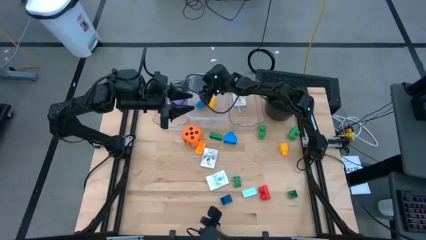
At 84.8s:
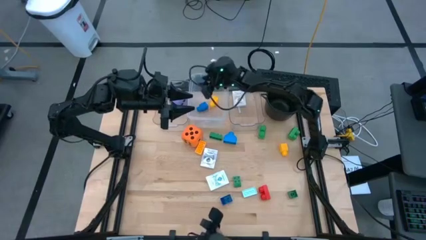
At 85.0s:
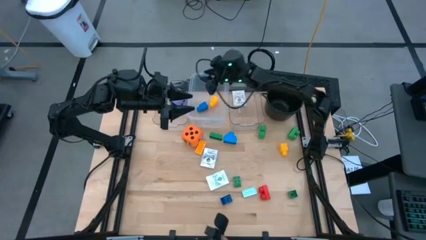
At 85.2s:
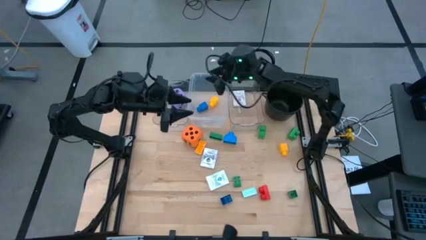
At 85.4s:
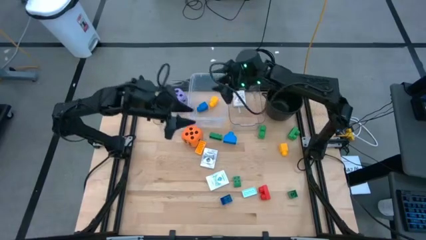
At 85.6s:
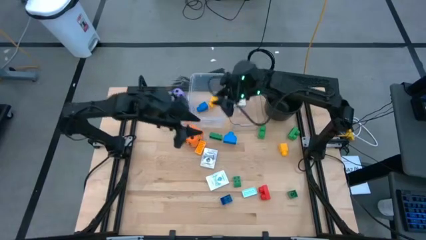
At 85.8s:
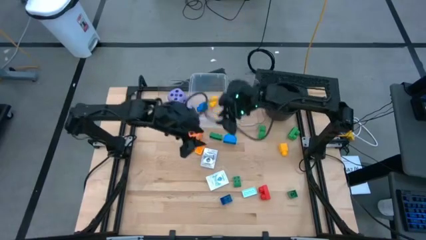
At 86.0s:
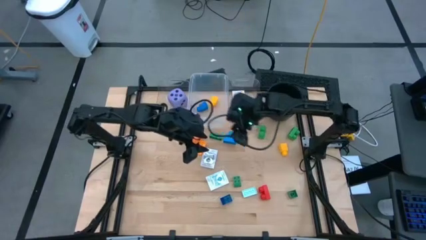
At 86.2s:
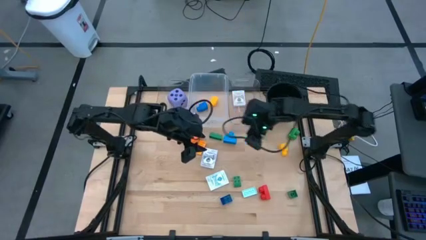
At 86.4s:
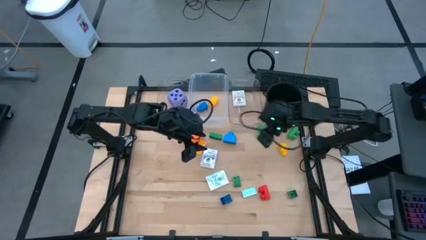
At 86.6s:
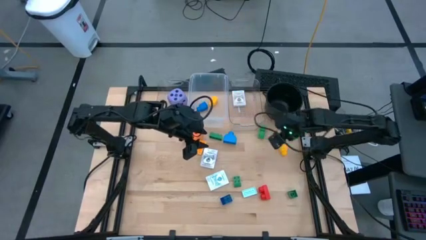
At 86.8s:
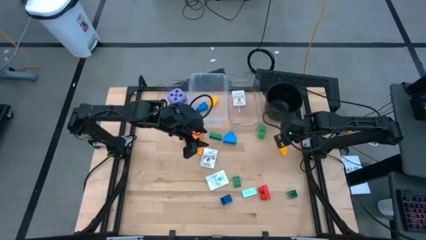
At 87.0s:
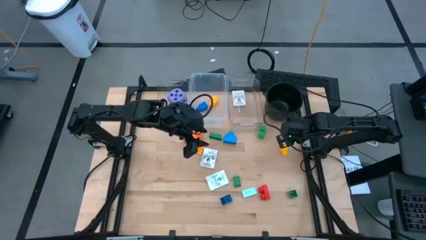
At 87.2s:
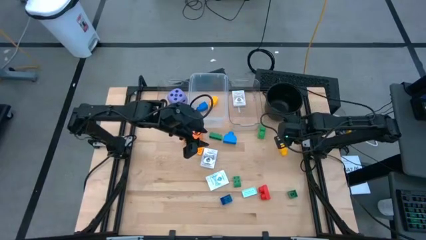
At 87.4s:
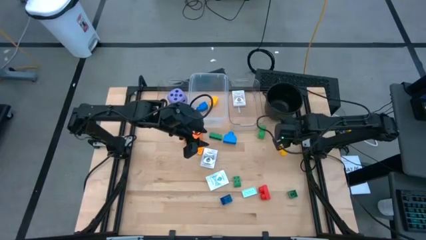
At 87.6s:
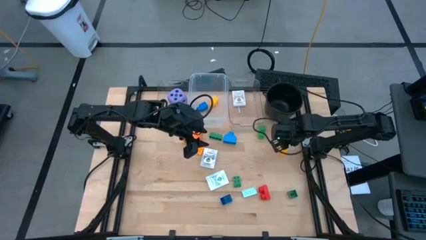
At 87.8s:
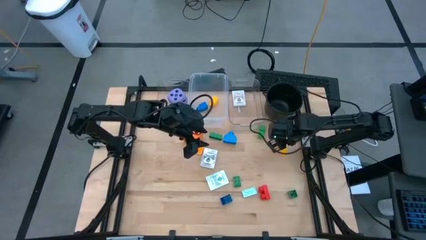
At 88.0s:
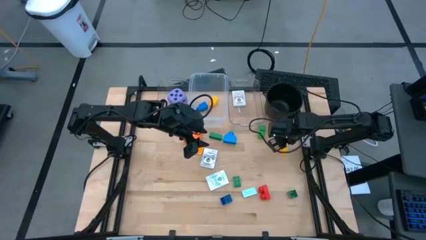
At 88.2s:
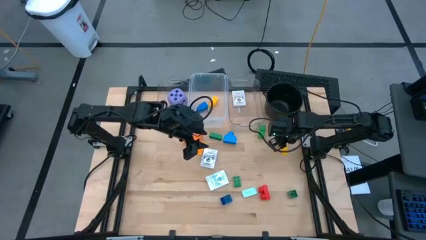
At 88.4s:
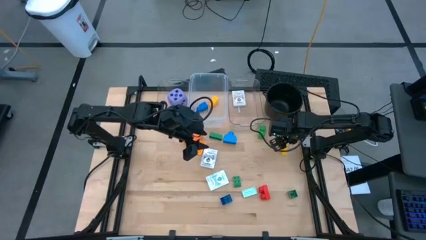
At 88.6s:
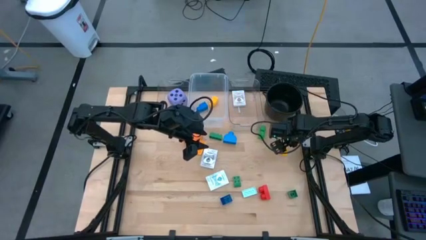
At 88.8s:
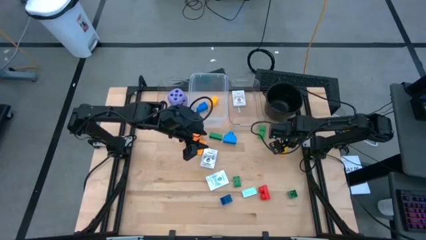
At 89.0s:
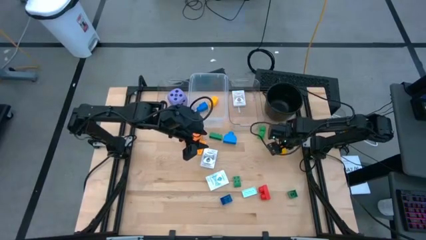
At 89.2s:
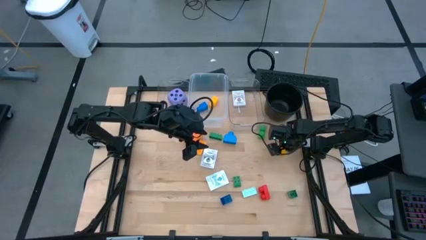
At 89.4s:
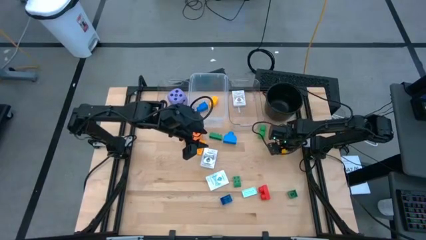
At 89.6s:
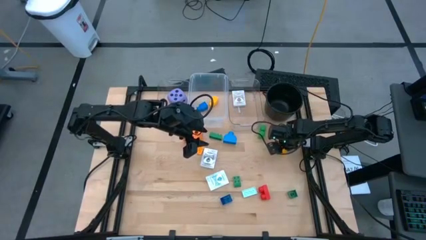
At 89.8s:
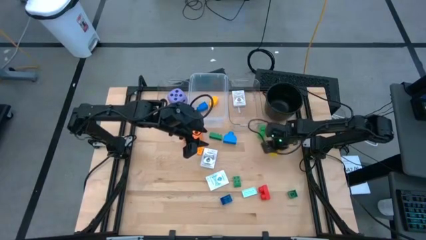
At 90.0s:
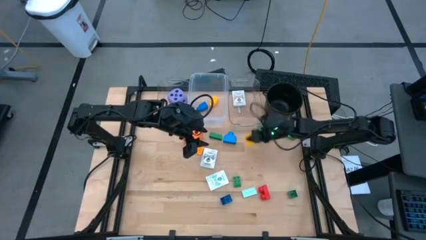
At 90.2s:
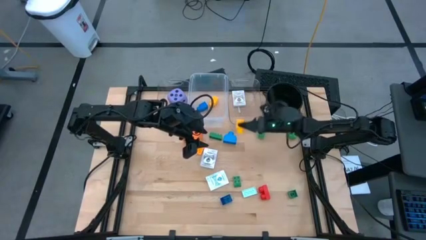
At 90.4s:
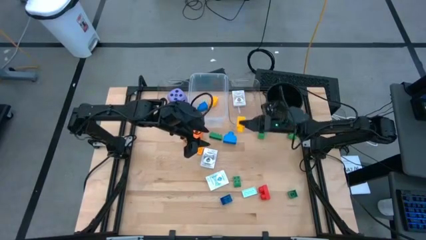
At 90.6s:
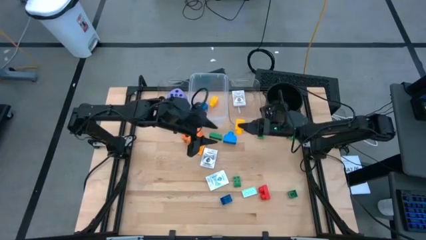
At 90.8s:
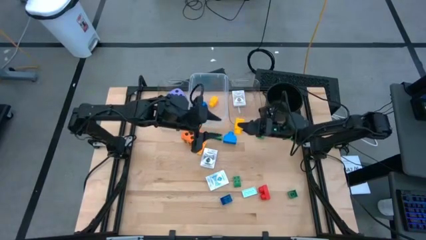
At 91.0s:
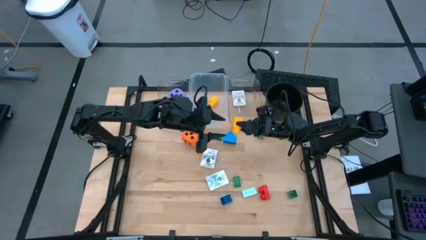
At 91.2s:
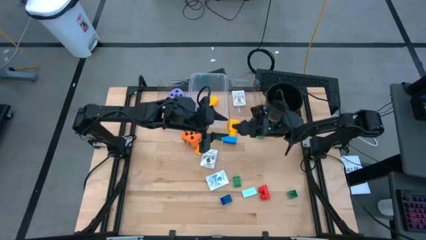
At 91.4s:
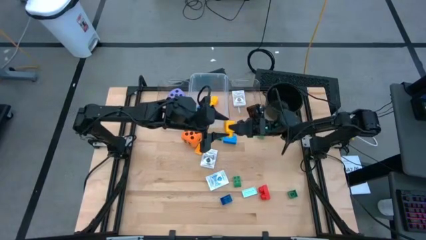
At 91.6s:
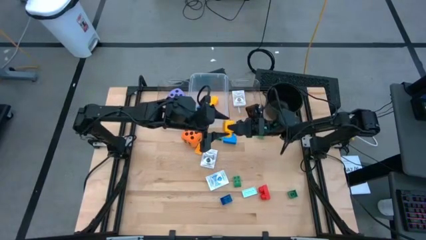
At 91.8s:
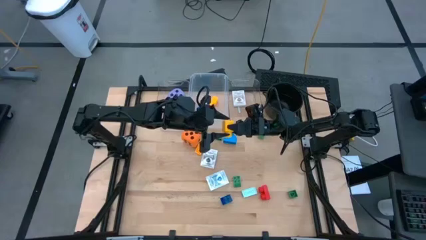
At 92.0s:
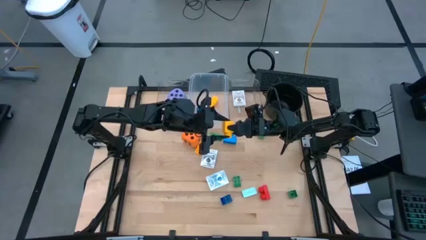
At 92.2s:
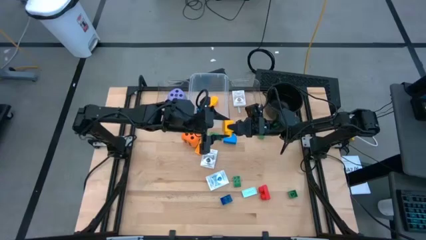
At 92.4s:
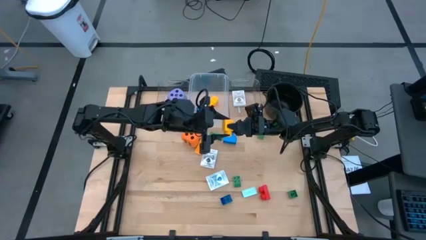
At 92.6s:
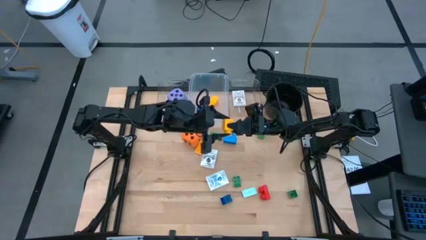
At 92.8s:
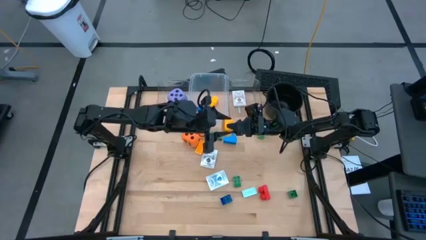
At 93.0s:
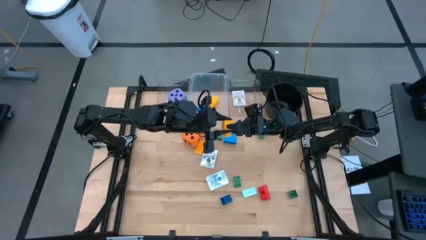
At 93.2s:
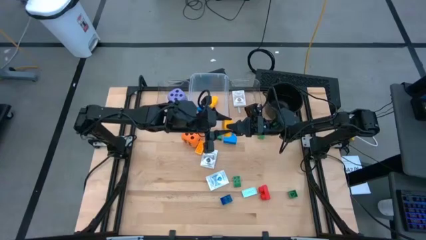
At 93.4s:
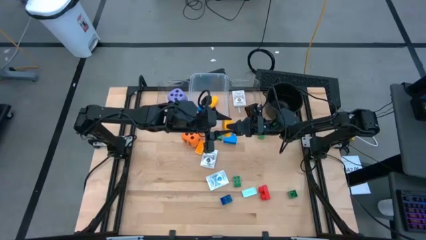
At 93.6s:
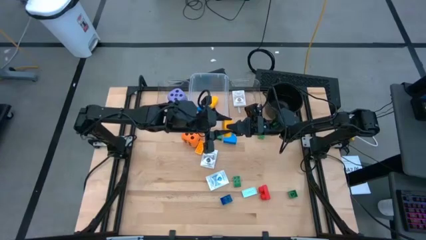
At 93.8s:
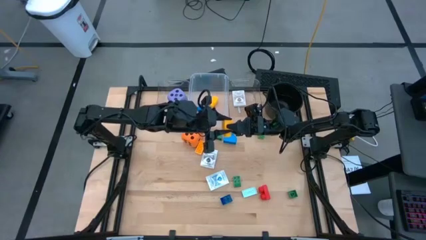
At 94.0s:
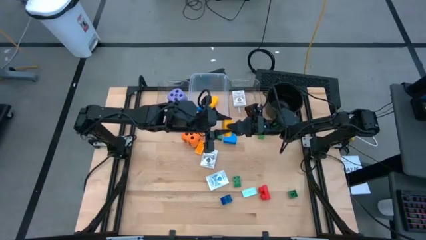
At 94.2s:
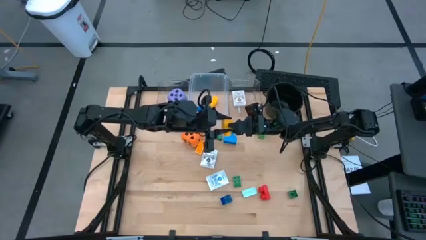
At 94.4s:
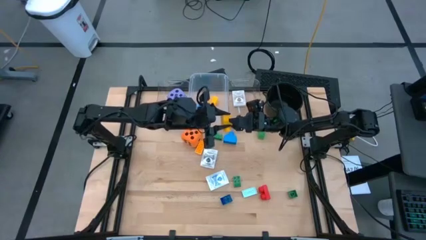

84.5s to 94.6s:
Task: Pick & Place Toys
Put the yellow one stud game piece into the middle transparent bin

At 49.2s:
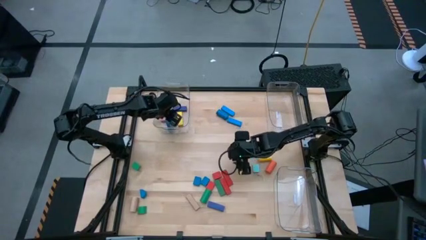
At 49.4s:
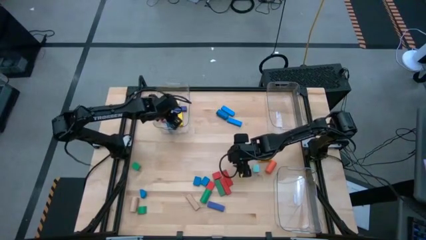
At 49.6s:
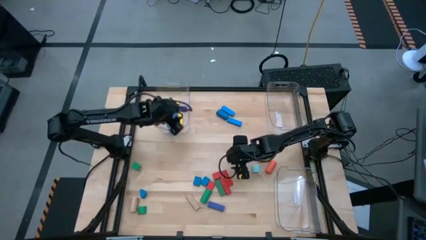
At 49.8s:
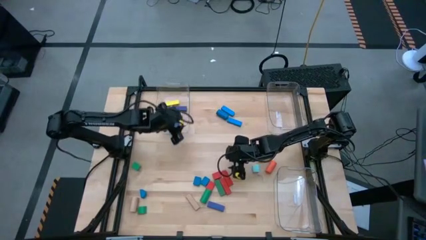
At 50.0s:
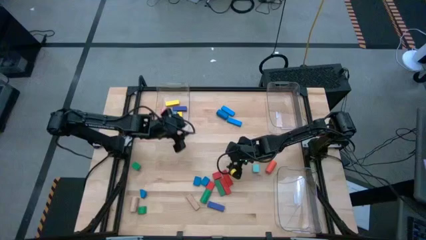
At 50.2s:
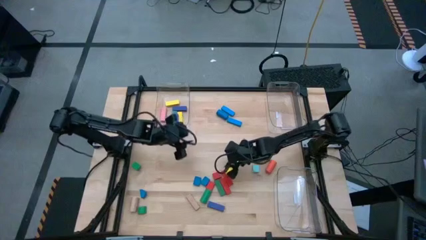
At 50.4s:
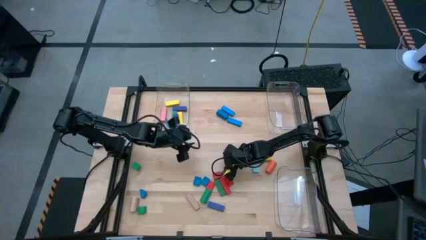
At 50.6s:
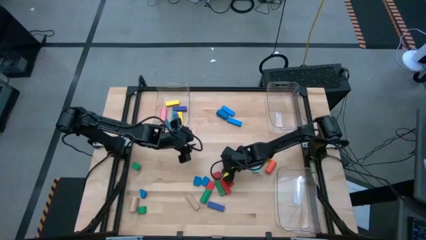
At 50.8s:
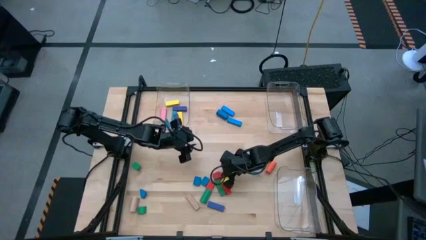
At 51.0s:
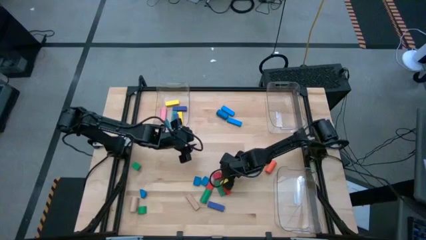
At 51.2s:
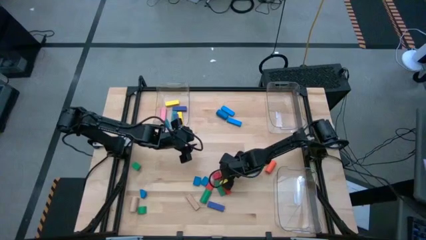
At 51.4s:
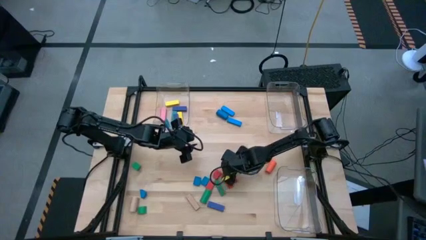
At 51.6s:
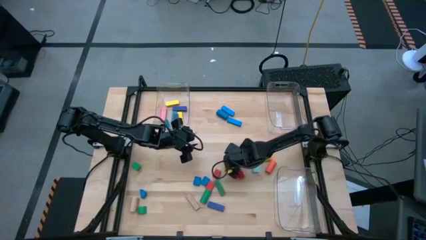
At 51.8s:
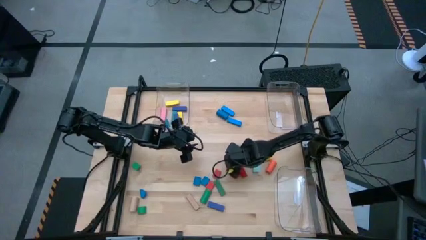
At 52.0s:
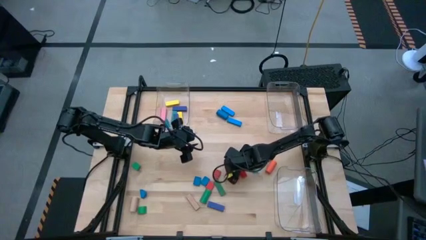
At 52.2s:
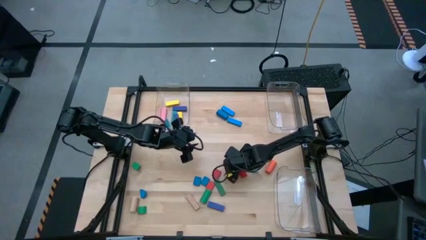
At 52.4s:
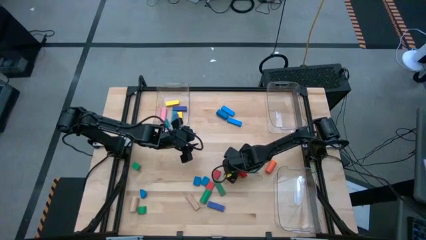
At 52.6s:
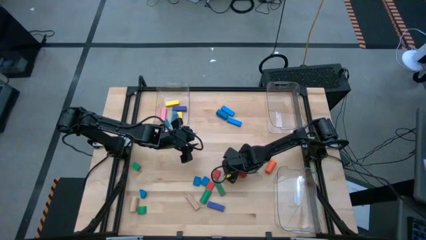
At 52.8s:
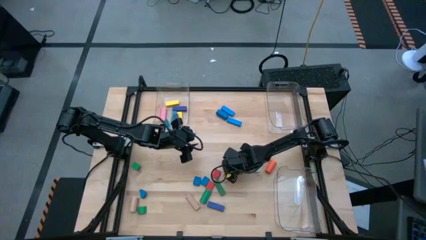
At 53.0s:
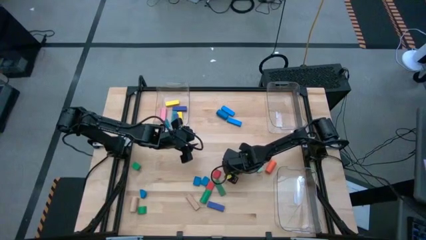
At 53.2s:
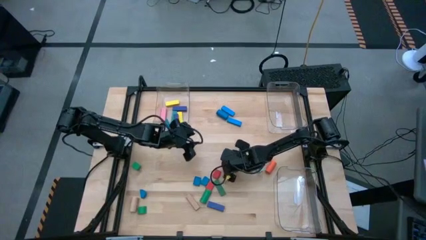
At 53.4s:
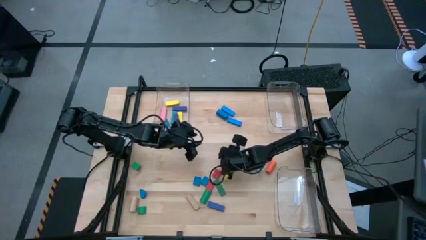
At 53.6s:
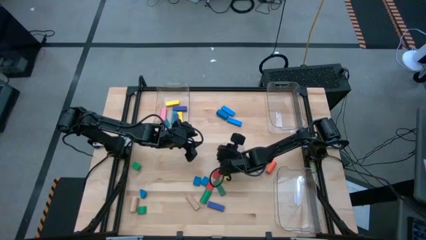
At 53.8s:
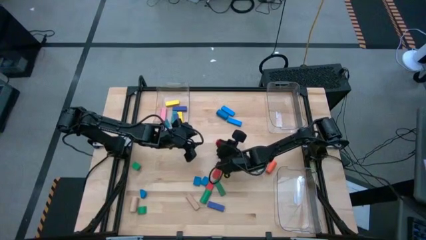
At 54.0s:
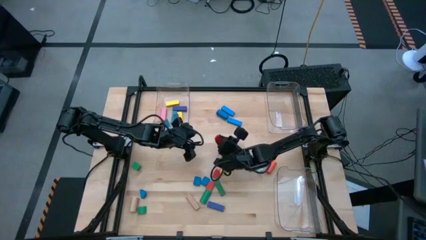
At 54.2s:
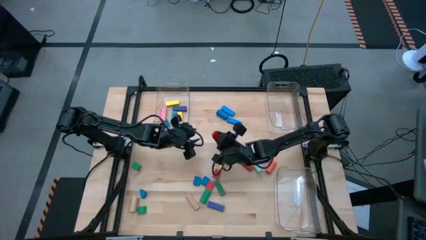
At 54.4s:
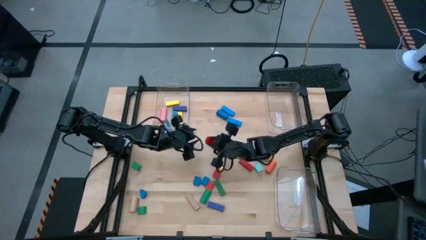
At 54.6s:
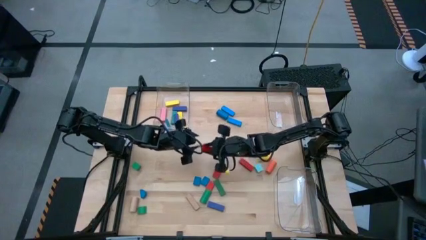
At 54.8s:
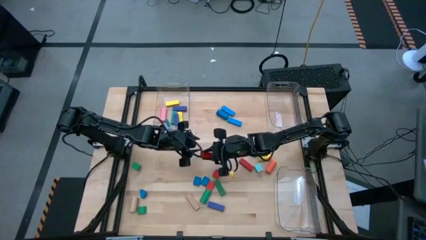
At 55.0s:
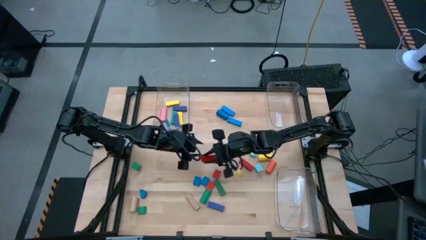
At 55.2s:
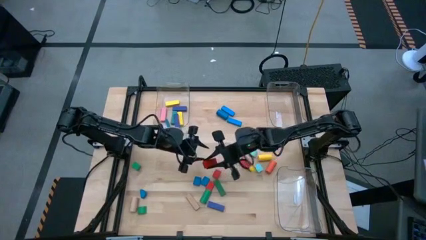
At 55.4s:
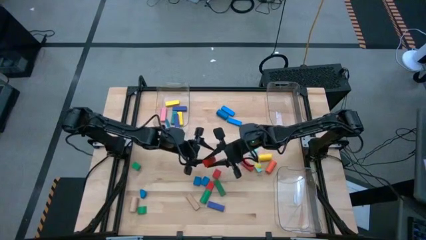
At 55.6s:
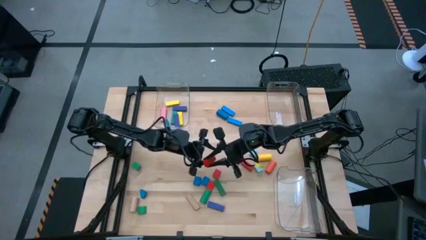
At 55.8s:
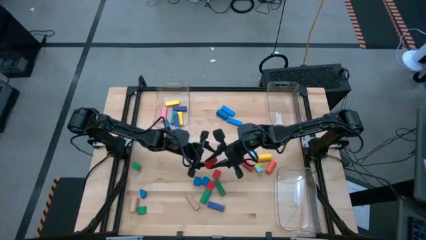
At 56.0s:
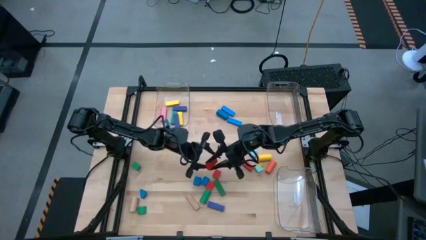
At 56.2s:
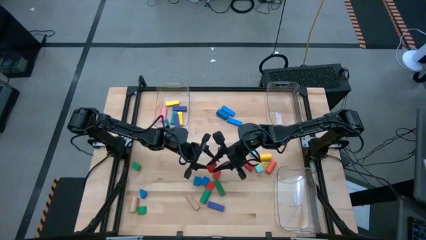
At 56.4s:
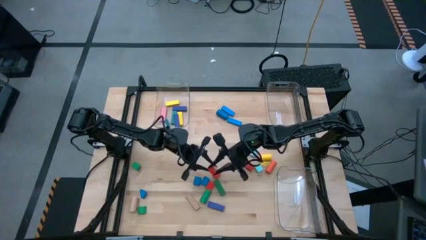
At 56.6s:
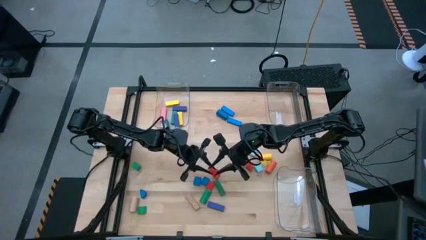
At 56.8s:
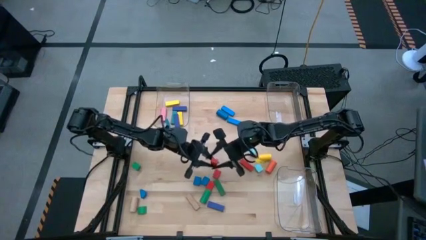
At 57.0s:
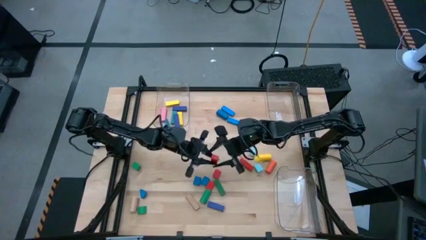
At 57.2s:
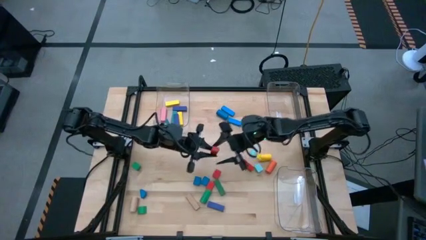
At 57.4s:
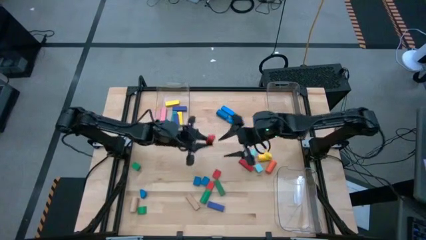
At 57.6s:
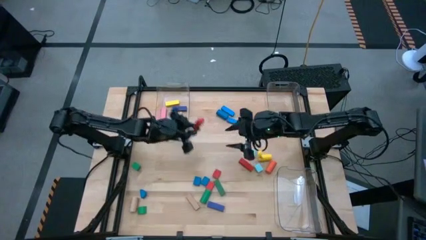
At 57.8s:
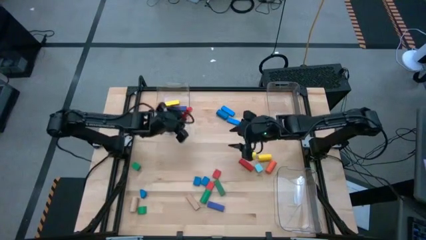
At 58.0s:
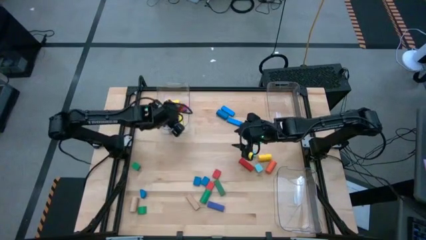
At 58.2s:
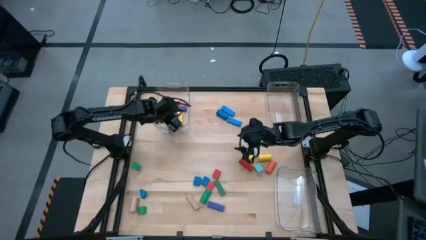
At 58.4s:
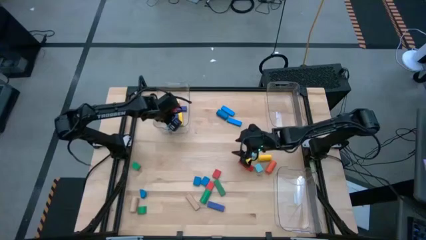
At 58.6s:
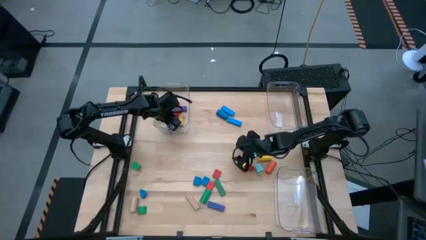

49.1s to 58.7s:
Task: Sort blocks by size
Put the red rectangle block into the top left transparent bin
